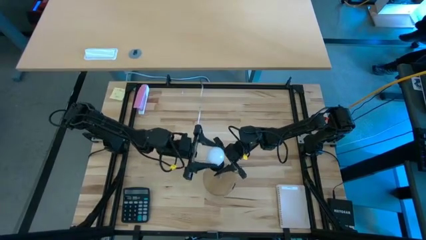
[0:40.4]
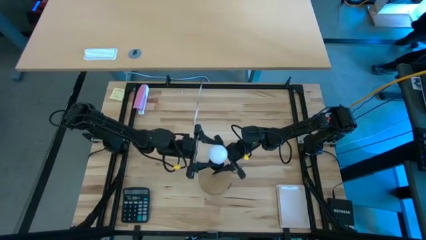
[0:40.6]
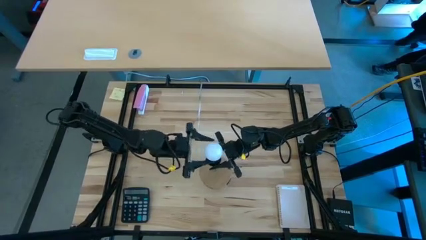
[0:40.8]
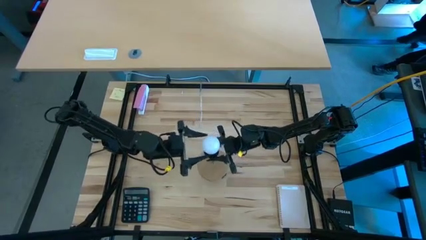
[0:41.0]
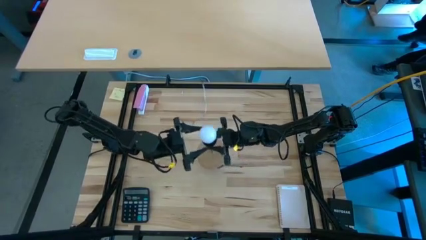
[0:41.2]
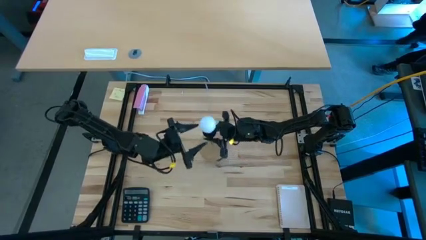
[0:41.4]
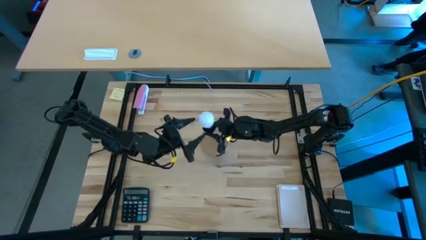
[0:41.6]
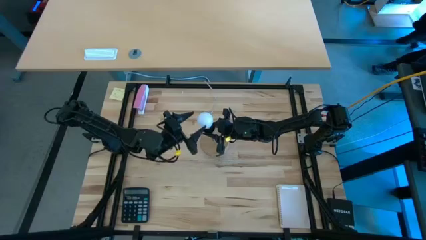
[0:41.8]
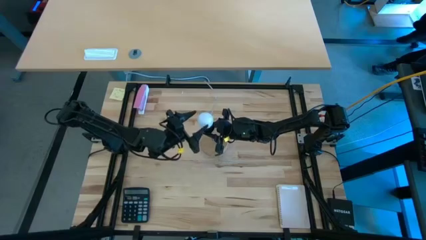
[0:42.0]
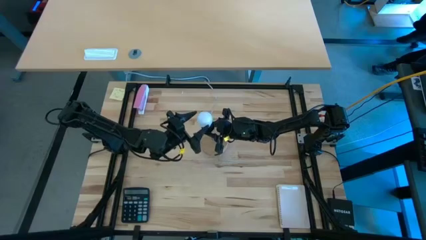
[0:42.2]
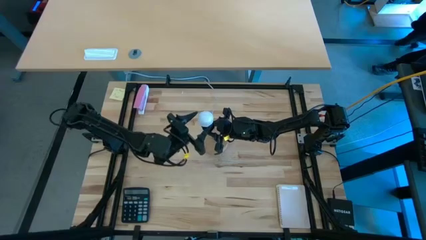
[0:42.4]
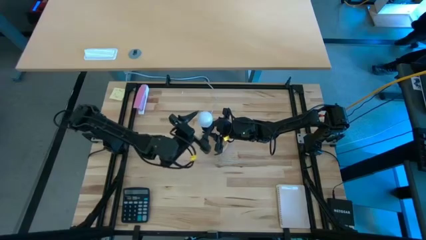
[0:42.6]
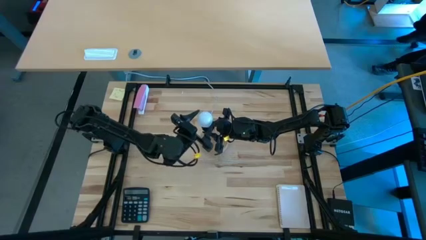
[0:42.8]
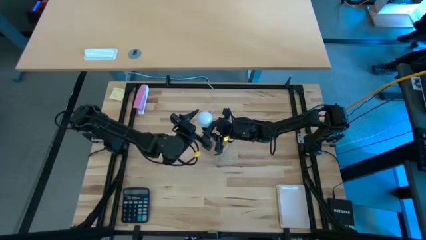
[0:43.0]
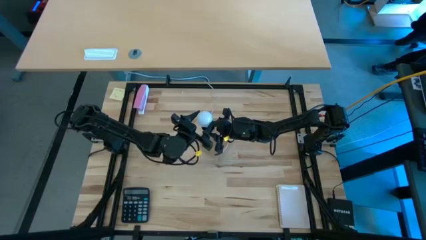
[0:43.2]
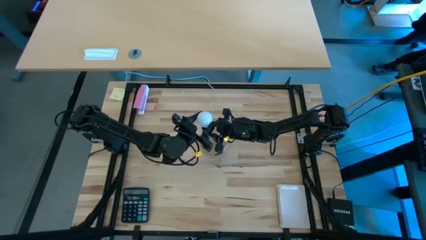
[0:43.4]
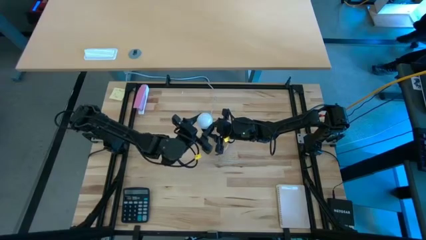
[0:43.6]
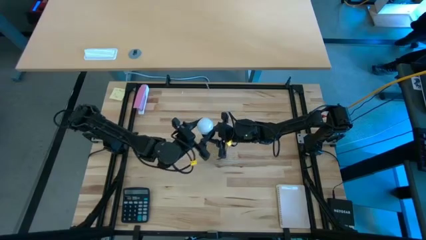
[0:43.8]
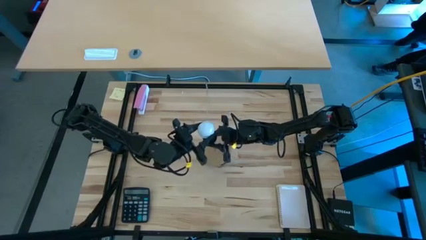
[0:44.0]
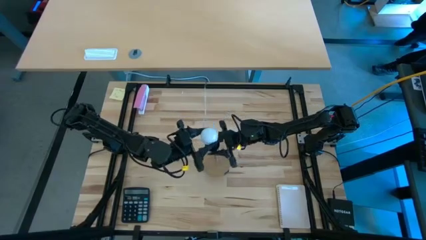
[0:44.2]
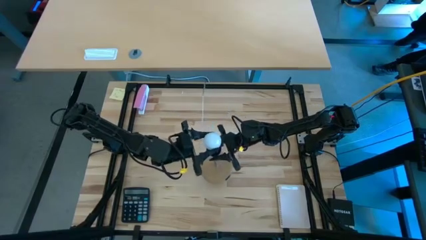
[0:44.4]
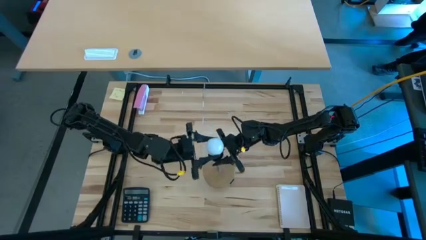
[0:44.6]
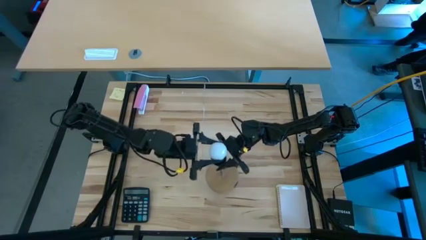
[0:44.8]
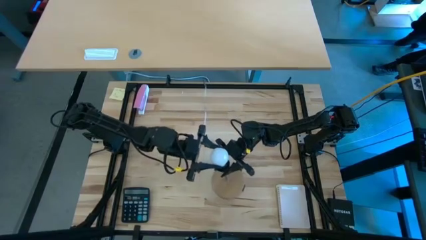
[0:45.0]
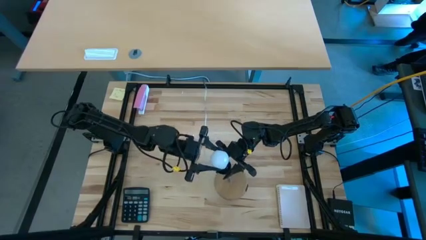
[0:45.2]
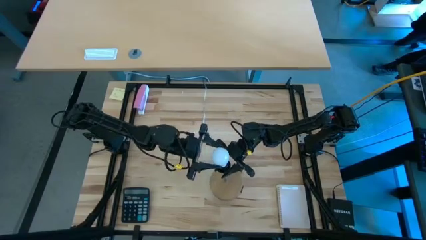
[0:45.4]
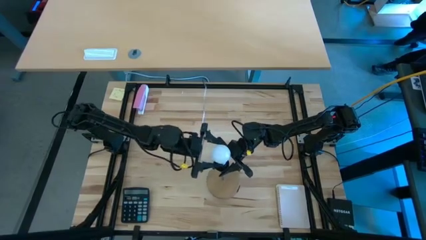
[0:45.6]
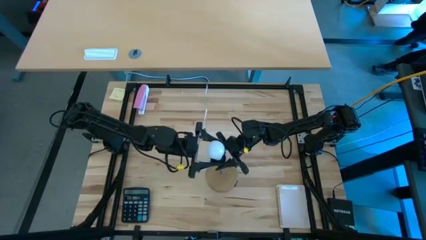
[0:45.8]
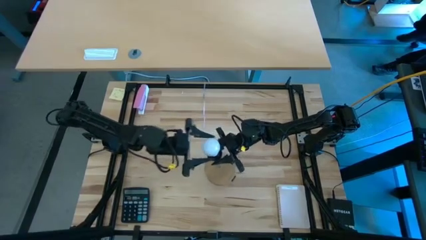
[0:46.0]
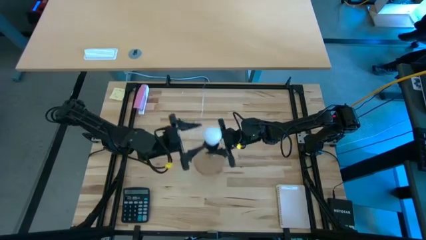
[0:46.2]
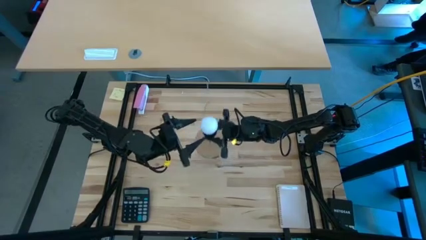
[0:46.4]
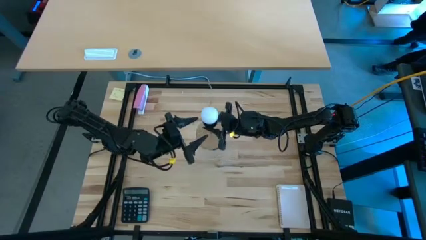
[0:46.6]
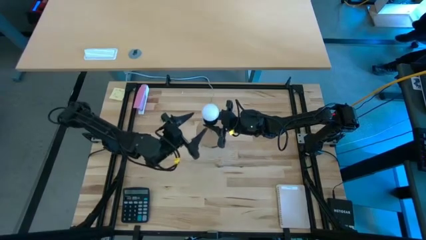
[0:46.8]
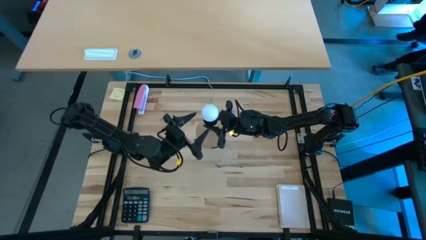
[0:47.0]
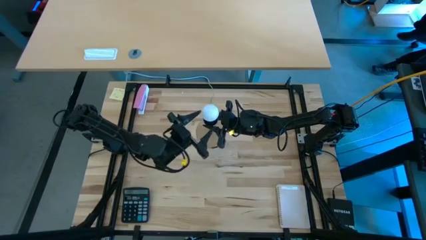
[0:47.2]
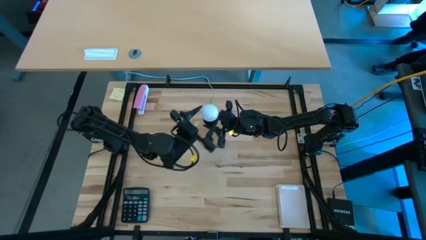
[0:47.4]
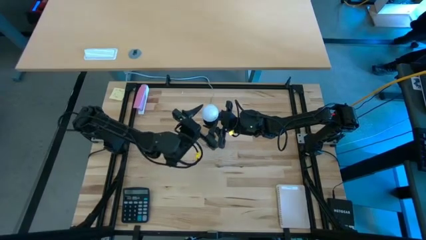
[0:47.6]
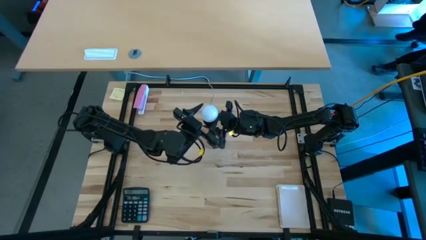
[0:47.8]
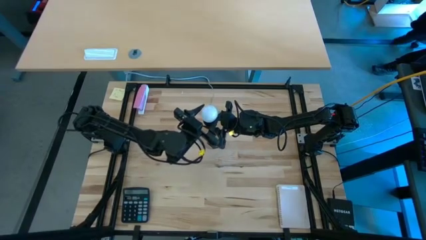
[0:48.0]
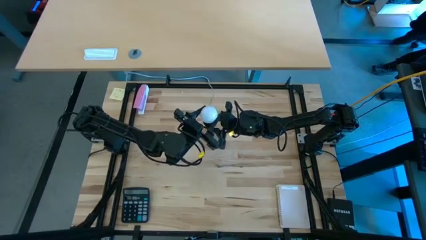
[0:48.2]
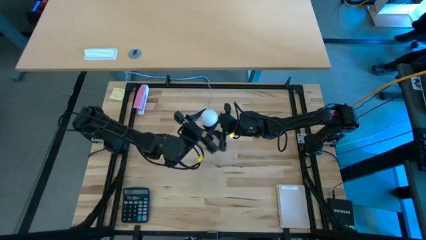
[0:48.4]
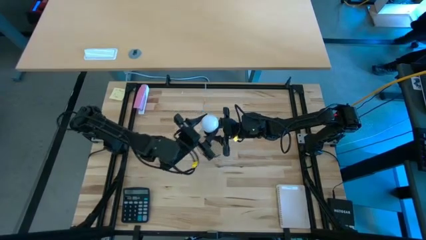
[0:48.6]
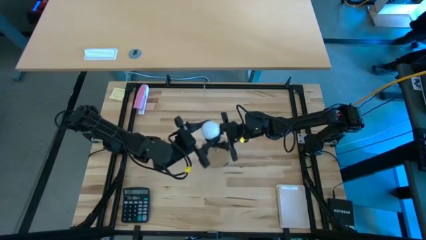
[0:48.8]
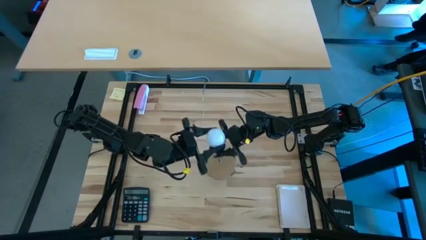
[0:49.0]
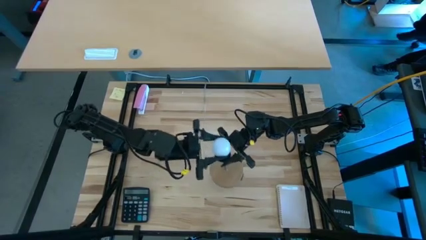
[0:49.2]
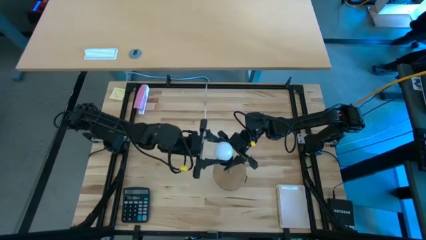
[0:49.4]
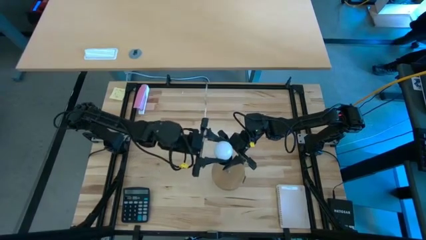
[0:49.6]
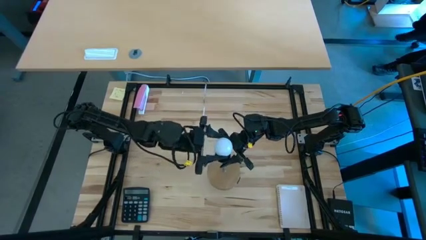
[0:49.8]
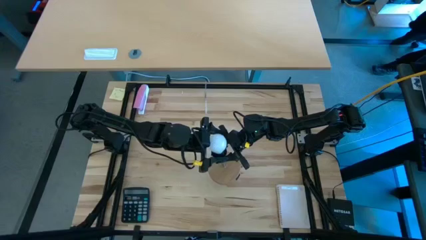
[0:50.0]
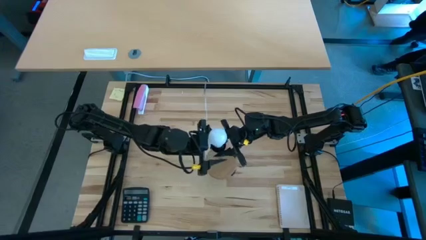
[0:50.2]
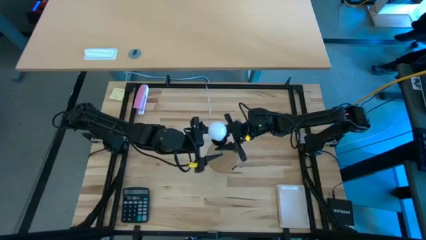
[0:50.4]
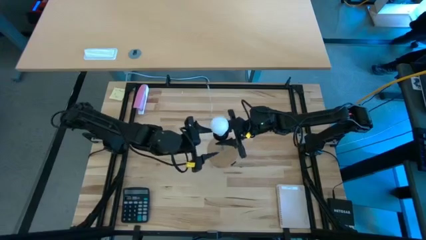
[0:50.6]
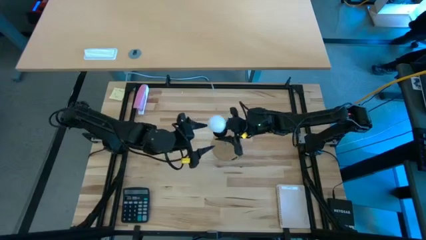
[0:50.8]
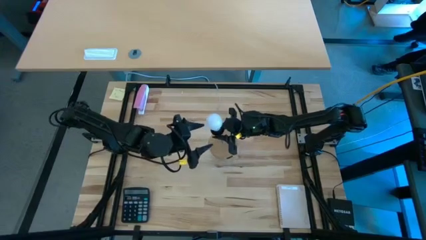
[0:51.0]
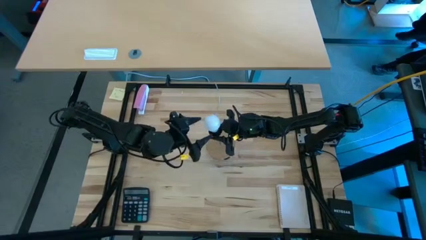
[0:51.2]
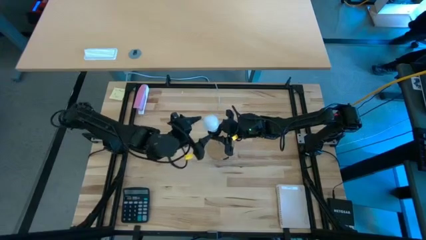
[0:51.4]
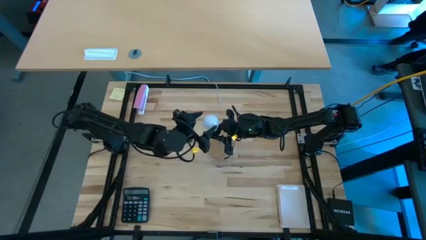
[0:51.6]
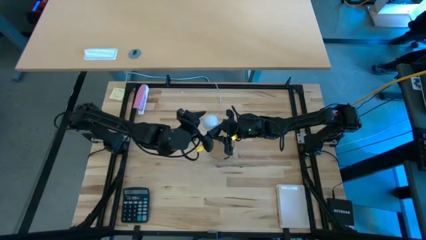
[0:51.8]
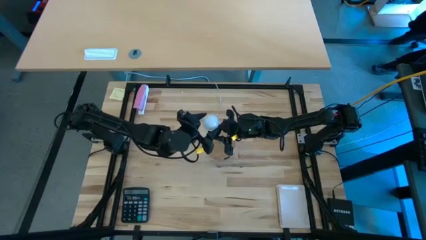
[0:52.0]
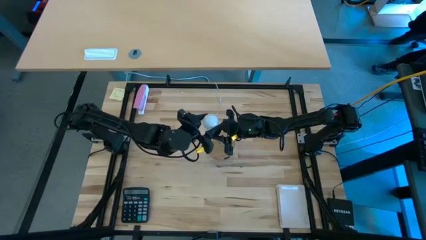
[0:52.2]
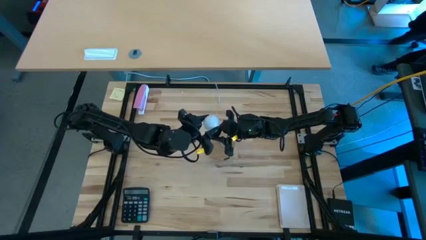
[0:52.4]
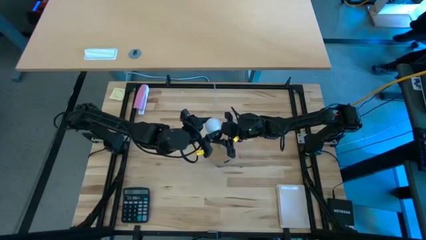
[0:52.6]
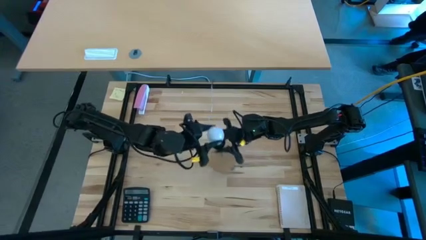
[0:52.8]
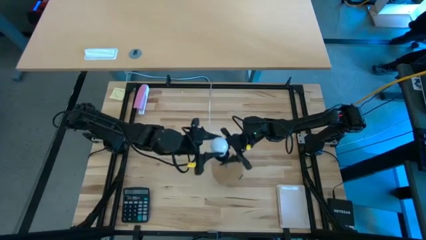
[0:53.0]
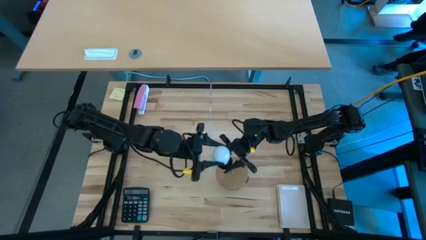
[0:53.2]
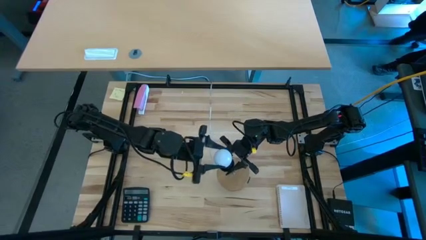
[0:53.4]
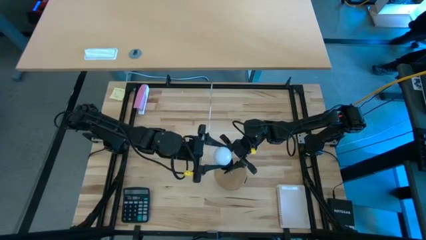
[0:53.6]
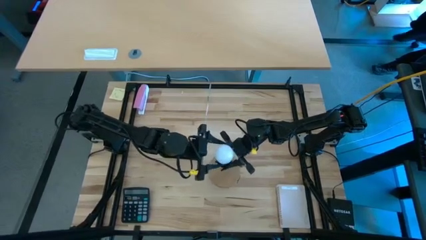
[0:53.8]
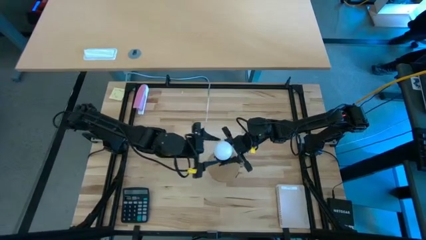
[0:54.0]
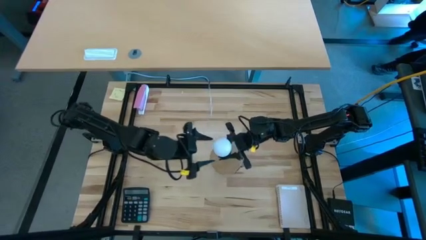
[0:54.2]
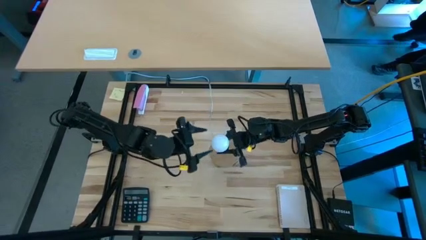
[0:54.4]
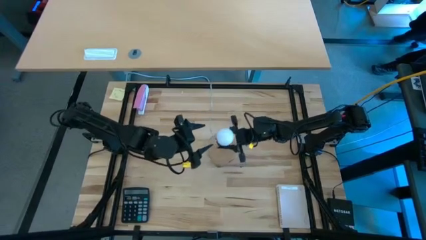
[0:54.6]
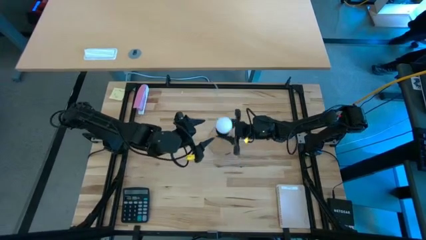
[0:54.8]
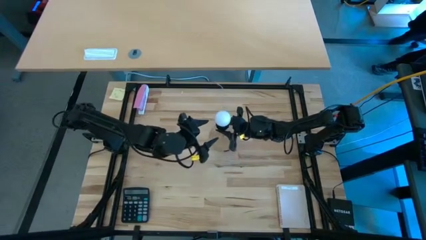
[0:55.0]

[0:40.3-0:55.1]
Task: Screw lightbulb
Insert the white lightbulb into the brown lamp
